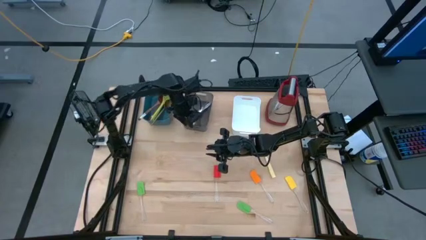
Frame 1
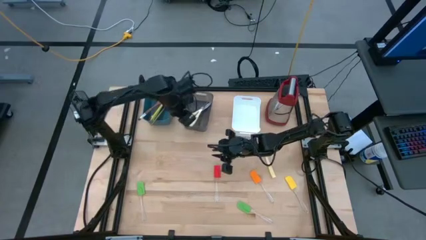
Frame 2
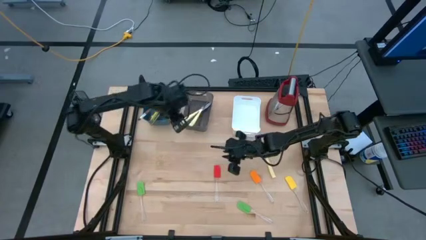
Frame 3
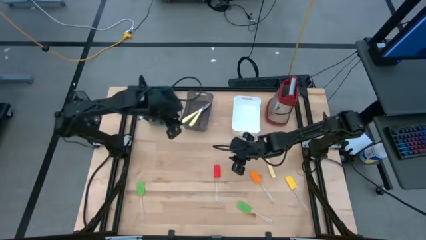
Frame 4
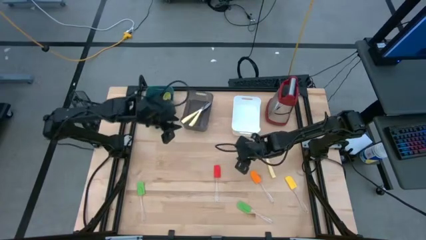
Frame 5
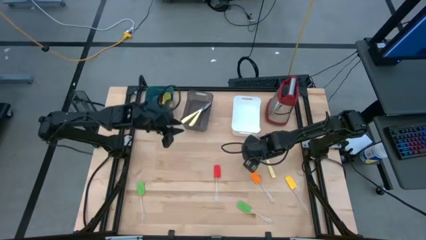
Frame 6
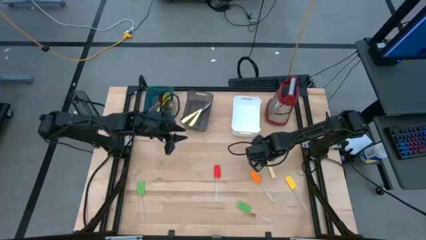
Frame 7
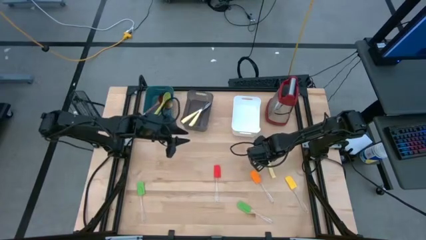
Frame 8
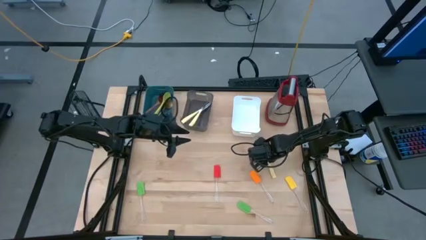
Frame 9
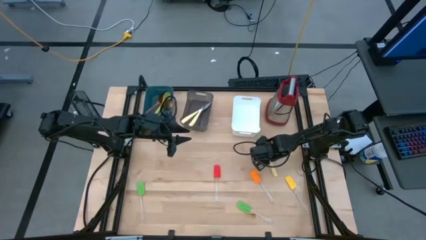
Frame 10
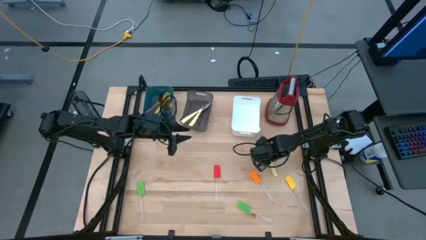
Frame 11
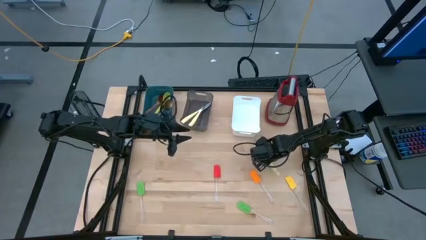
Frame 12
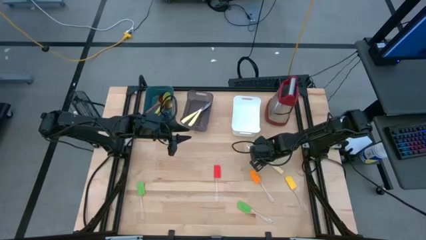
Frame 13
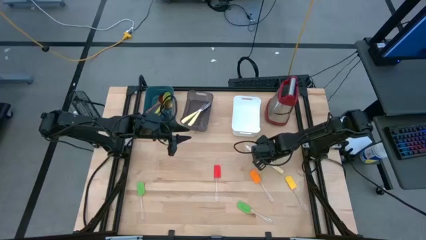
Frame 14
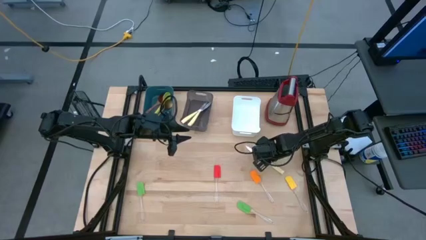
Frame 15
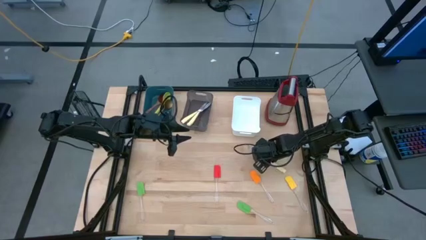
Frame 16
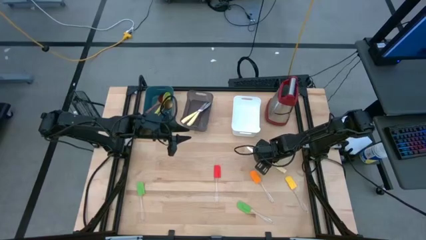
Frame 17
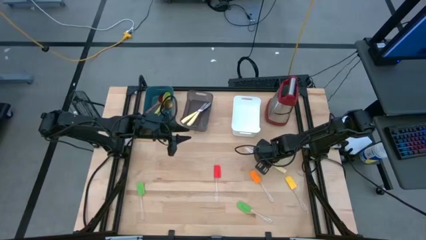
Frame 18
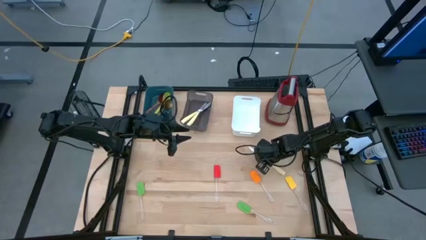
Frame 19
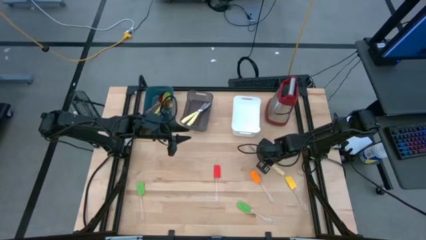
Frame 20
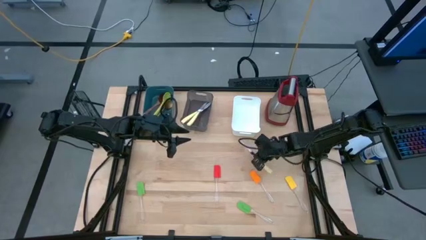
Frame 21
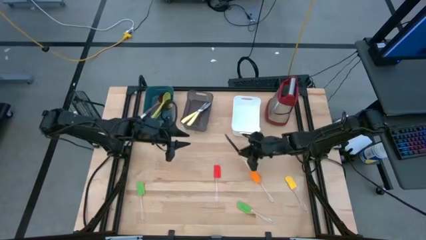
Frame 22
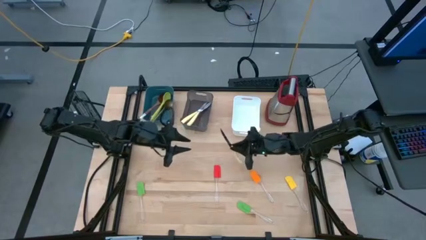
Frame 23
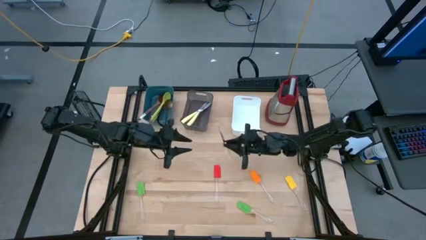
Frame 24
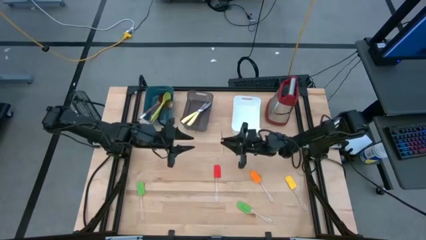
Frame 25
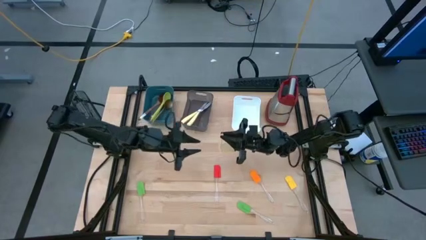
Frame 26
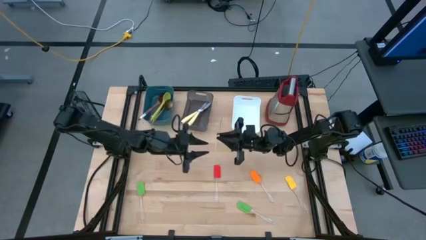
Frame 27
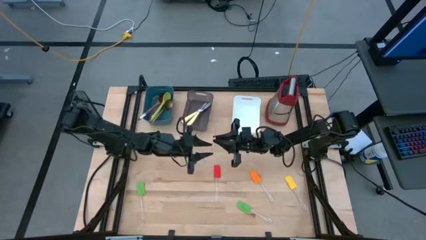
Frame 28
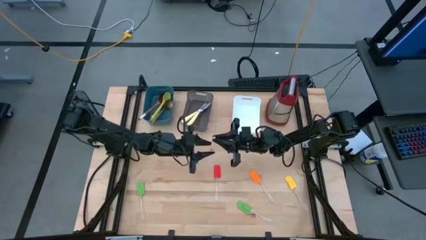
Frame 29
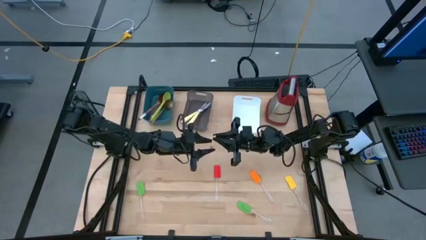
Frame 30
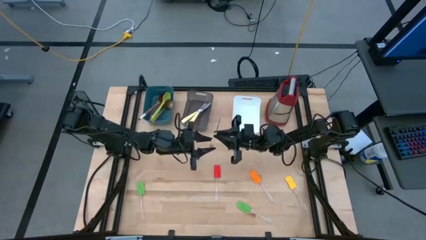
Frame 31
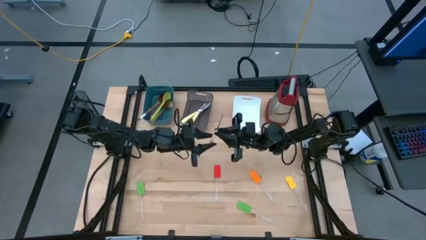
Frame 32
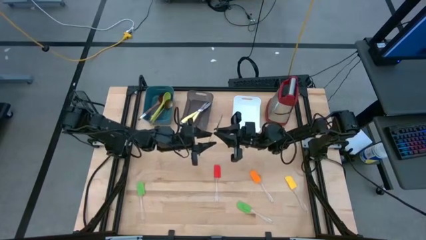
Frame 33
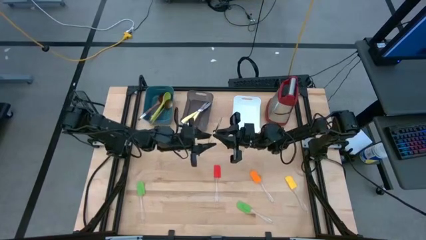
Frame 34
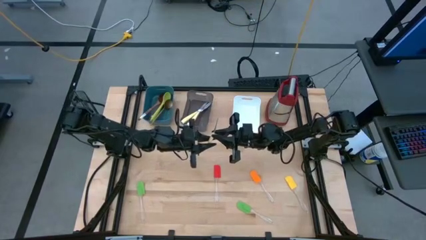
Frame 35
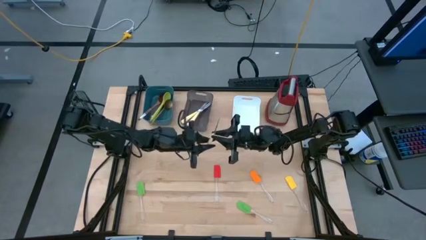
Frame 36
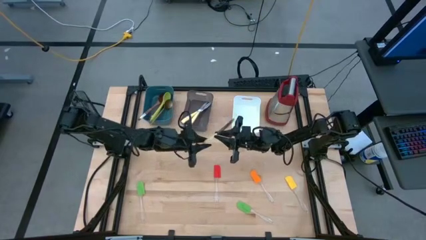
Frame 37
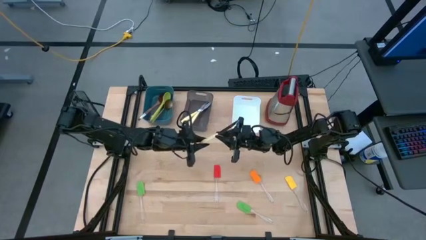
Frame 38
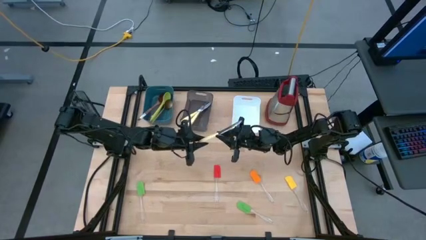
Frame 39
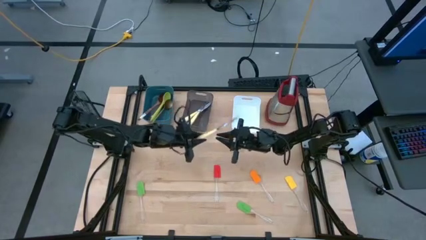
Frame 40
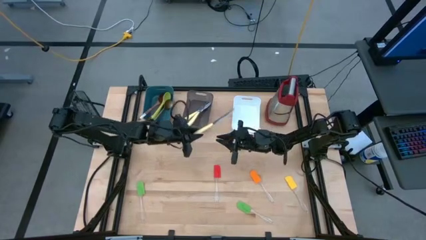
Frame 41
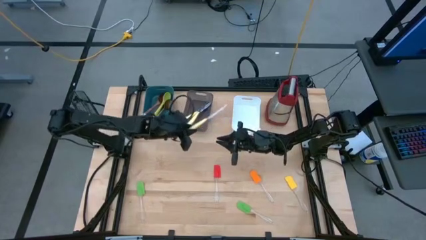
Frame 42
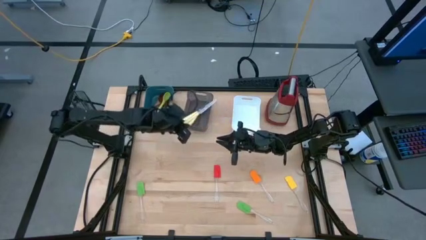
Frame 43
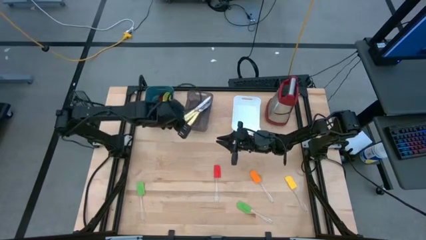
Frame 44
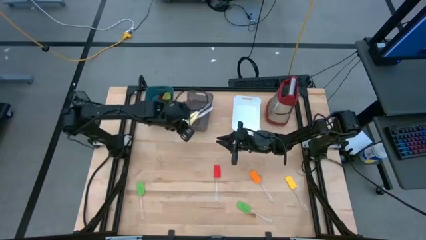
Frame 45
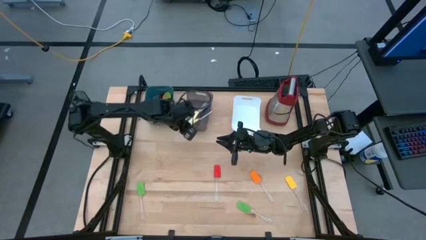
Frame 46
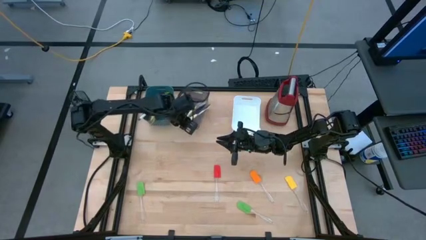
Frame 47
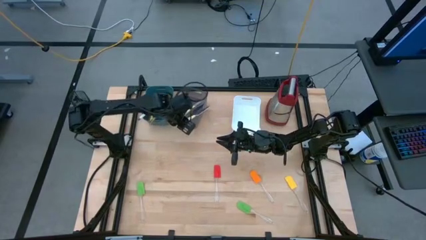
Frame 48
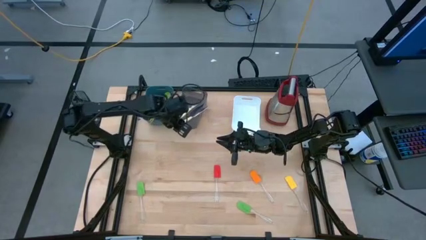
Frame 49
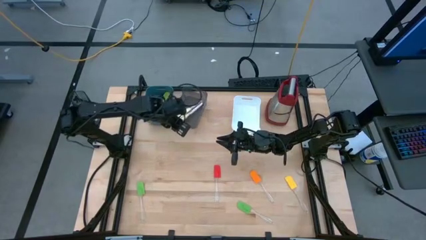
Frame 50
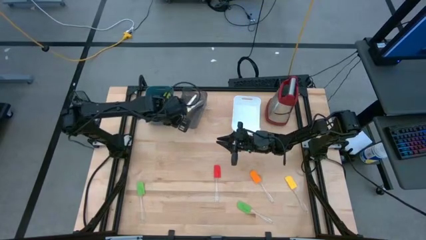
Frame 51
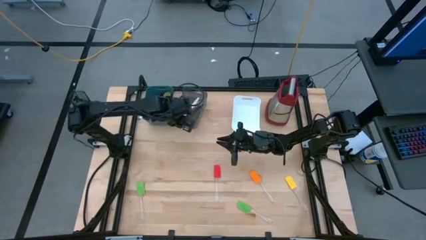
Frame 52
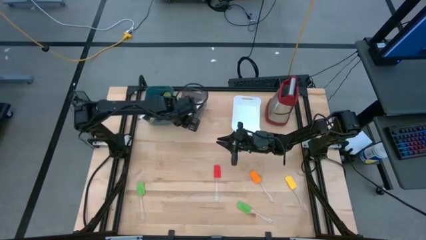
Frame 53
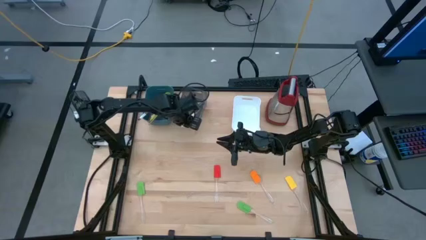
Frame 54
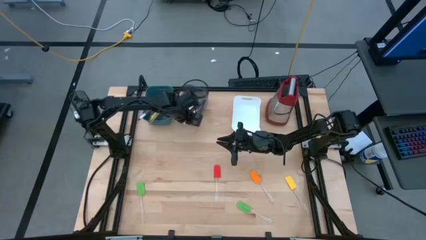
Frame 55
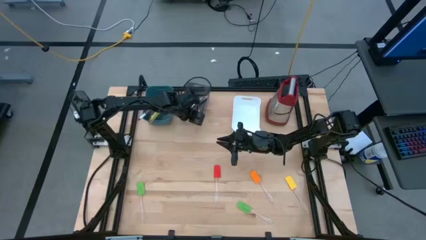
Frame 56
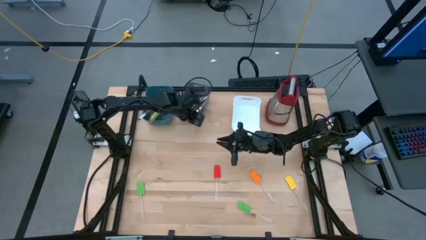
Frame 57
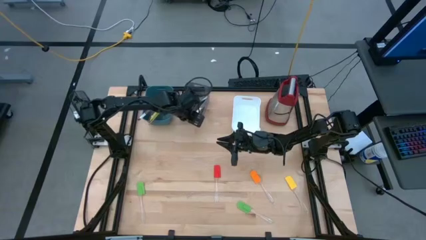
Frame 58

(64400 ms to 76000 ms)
Task: Pick & Place Kitchen Items
Put the yellow knife into the black bin

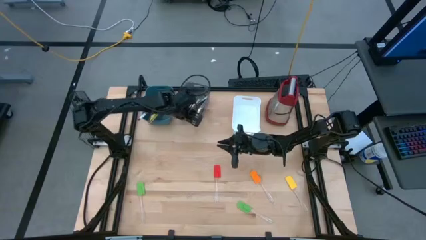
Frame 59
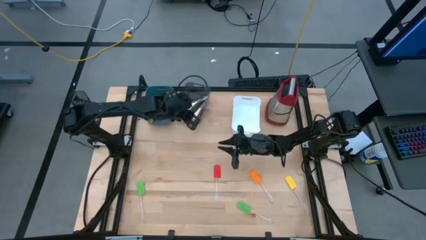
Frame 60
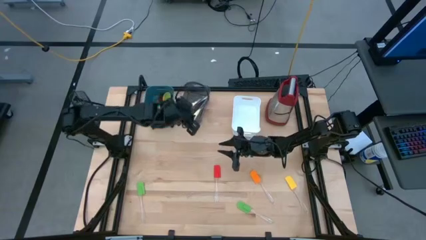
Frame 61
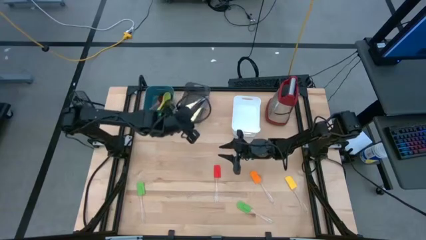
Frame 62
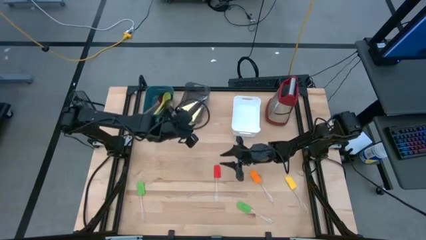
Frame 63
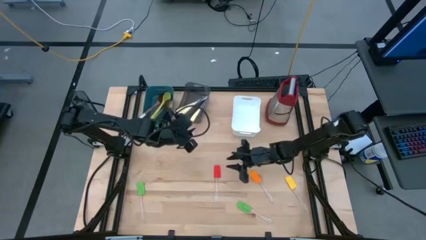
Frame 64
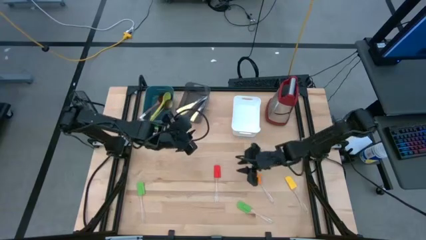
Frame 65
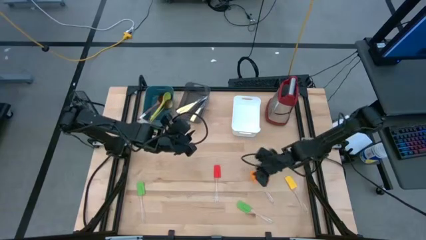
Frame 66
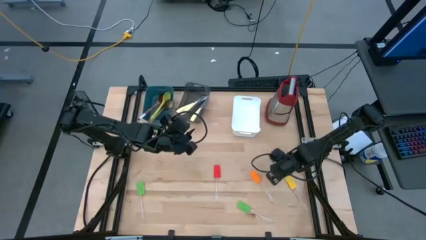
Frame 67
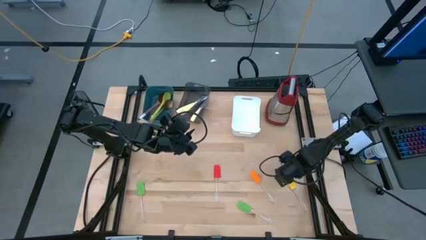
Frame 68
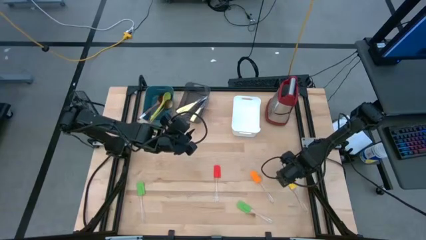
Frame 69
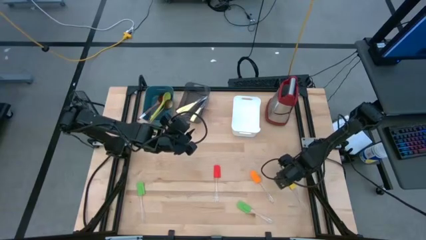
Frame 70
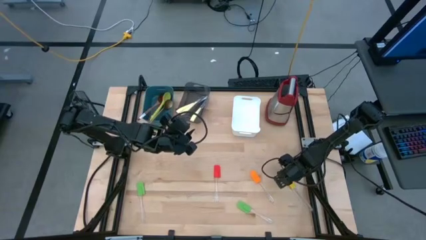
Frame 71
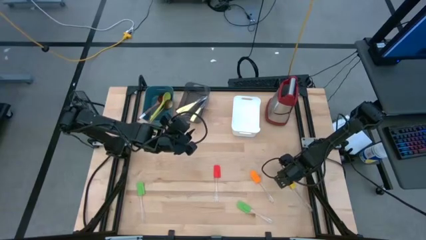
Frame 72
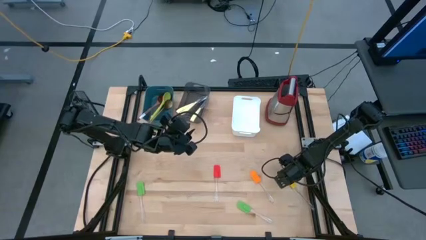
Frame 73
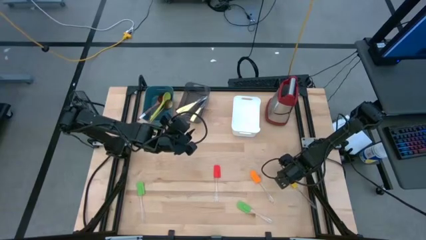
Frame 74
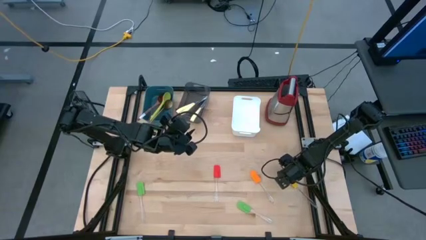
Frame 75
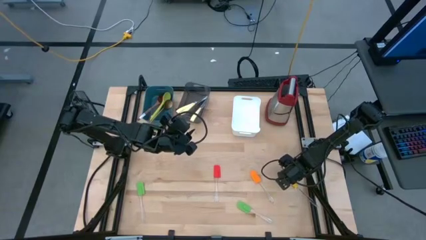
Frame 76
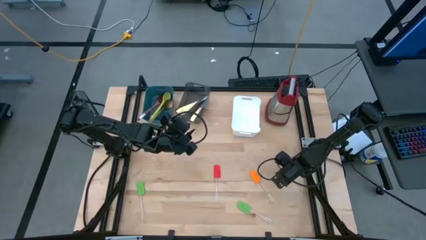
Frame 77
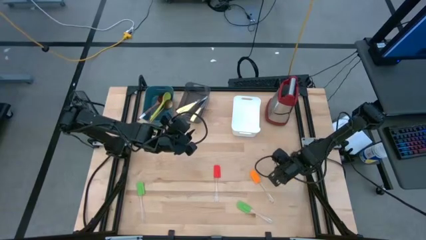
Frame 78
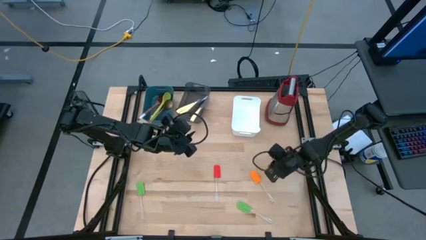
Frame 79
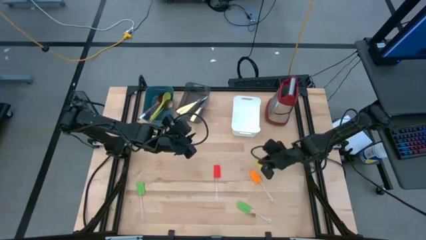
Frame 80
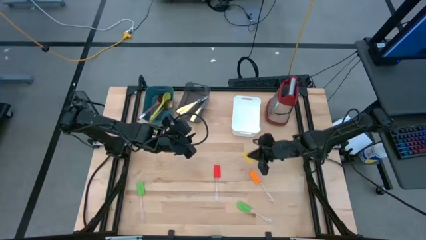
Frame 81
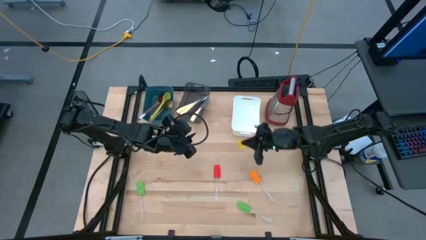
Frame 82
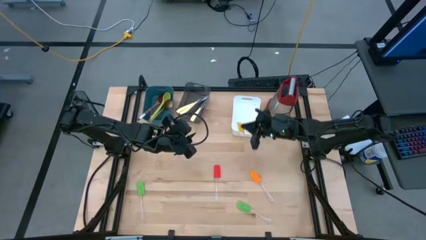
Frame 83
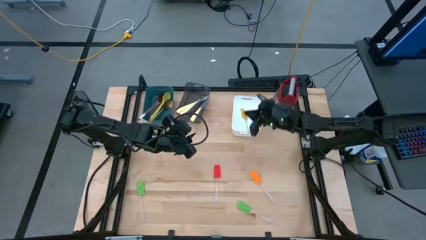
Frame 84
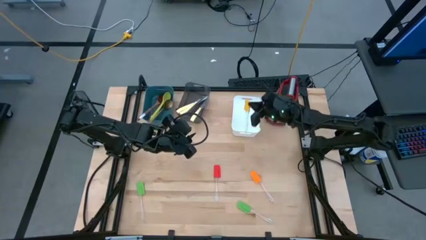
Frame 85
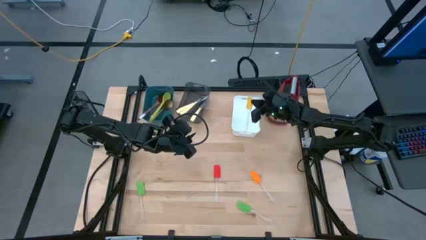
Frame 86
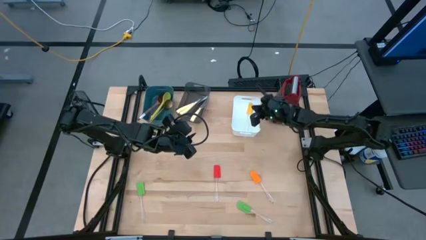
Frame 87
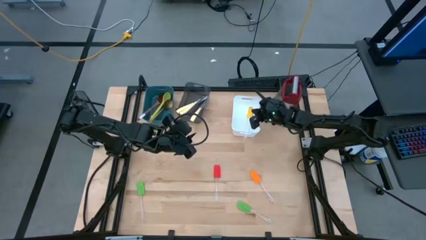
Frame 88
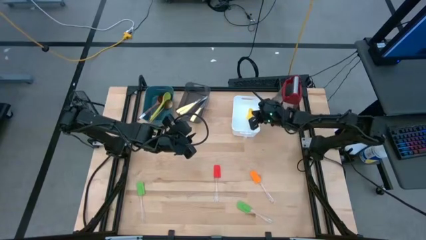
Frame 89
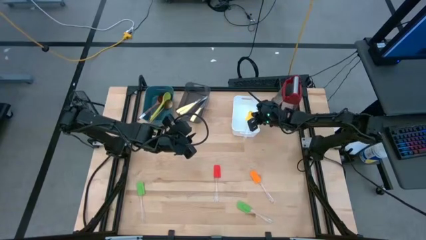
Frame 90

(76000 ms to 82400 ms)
Put the yellow spatula into the white bin
